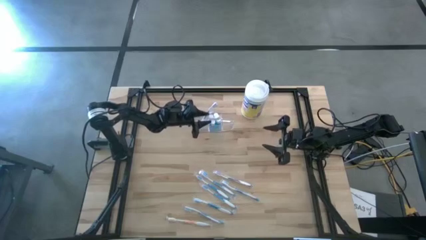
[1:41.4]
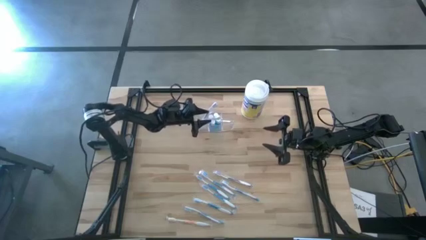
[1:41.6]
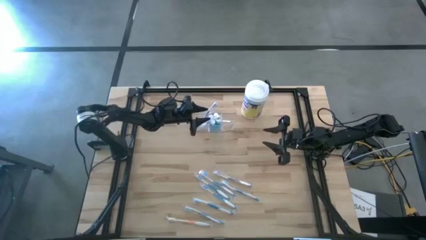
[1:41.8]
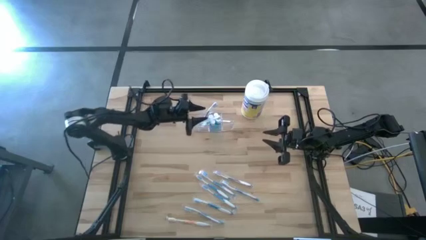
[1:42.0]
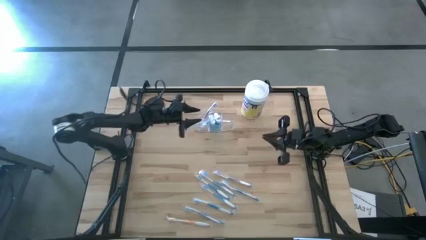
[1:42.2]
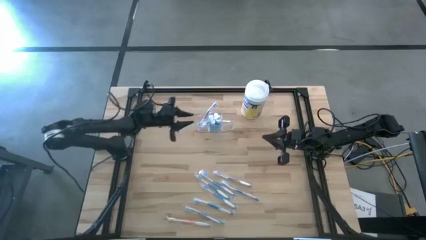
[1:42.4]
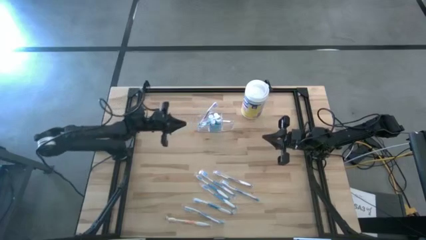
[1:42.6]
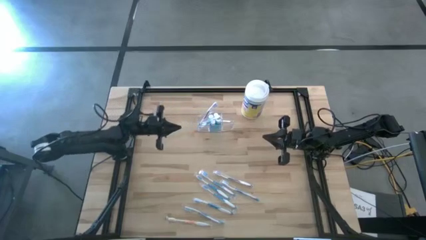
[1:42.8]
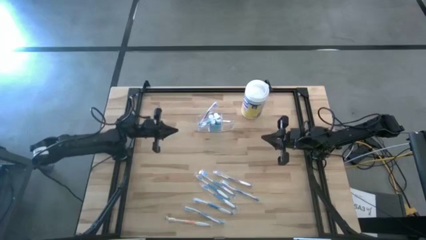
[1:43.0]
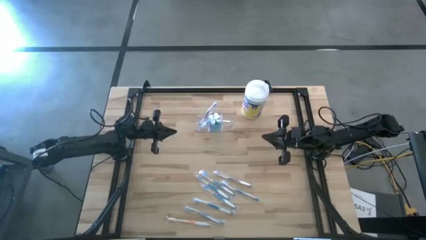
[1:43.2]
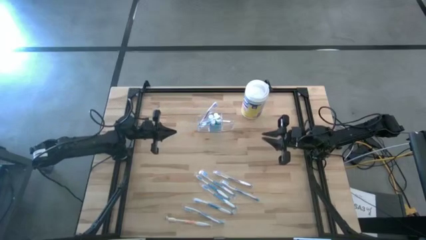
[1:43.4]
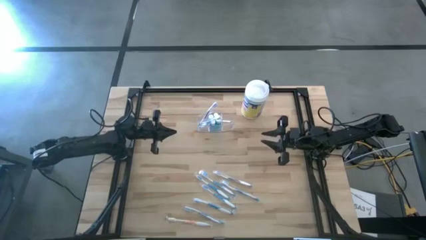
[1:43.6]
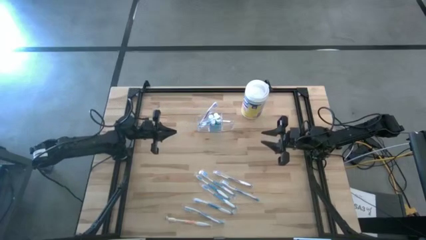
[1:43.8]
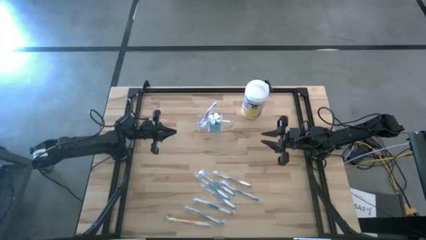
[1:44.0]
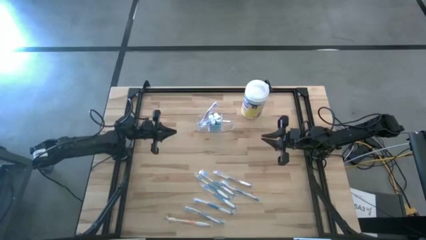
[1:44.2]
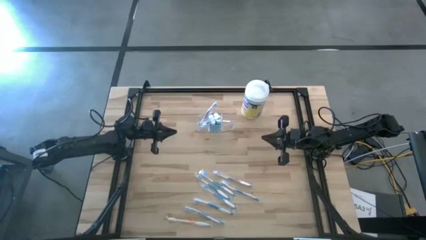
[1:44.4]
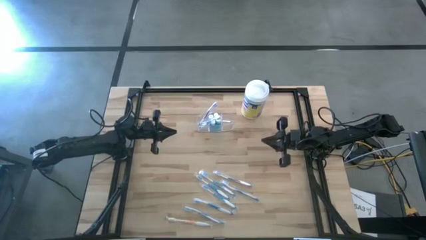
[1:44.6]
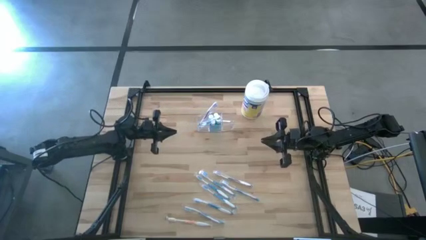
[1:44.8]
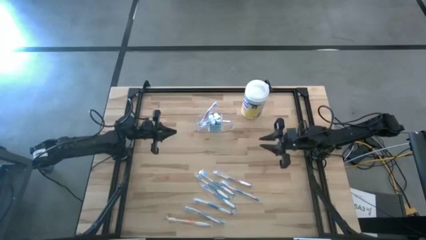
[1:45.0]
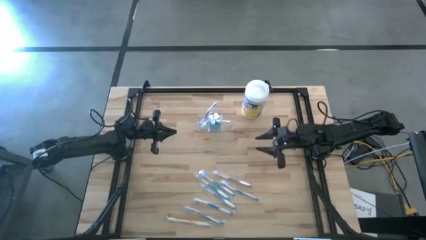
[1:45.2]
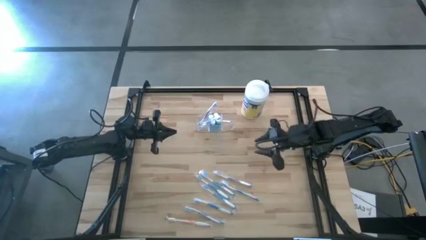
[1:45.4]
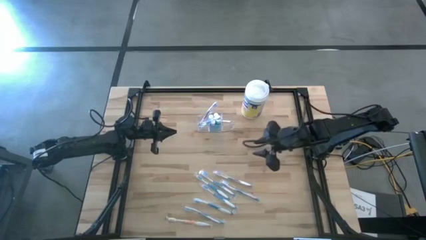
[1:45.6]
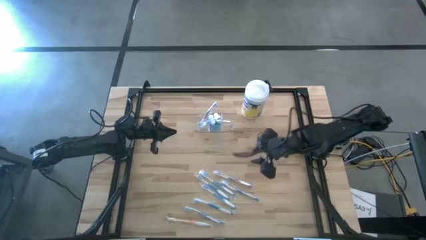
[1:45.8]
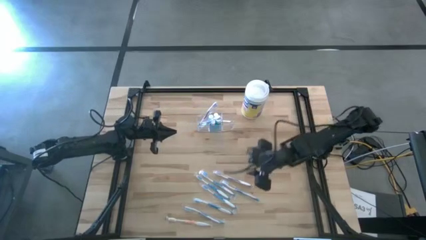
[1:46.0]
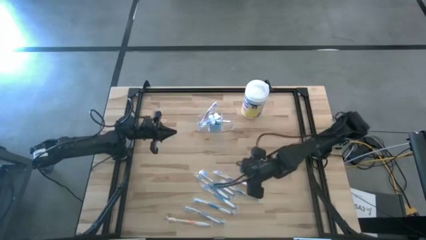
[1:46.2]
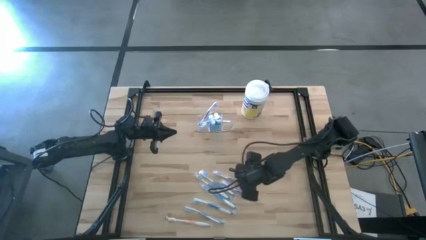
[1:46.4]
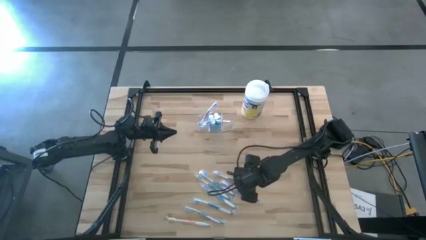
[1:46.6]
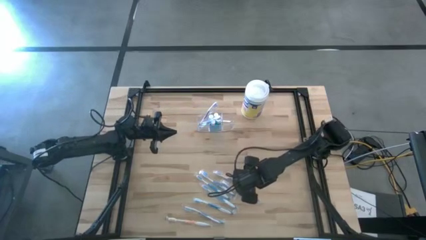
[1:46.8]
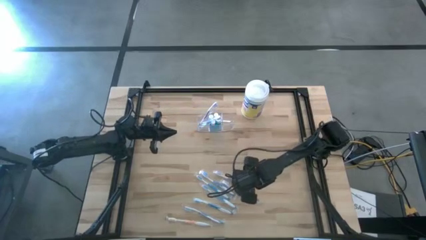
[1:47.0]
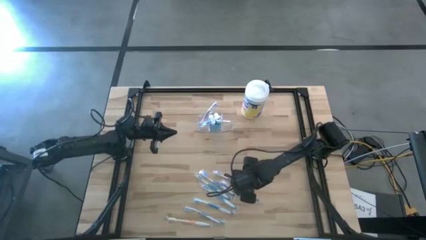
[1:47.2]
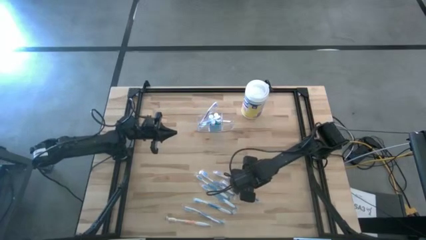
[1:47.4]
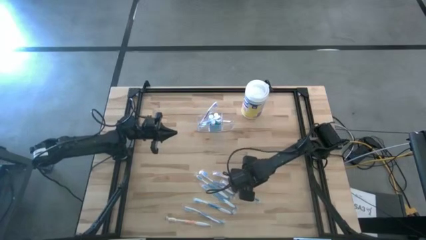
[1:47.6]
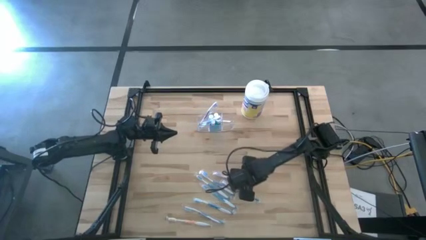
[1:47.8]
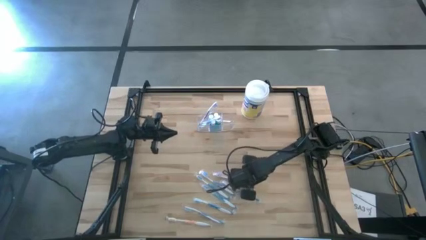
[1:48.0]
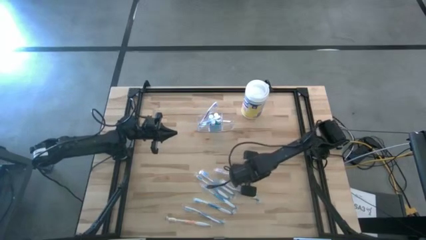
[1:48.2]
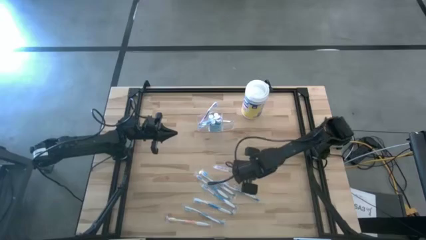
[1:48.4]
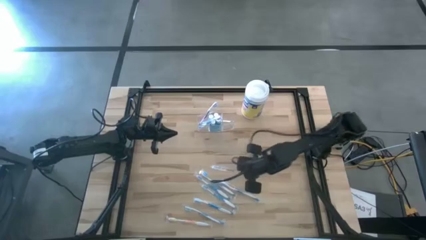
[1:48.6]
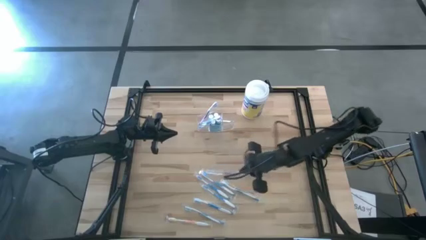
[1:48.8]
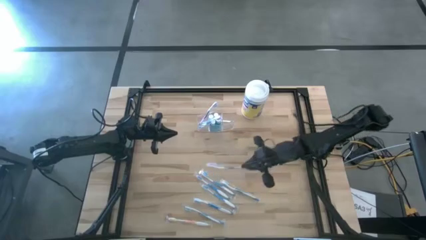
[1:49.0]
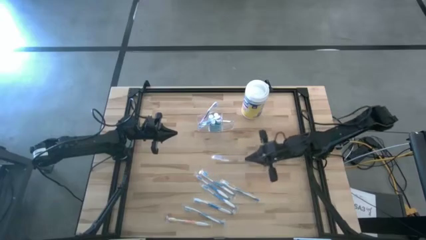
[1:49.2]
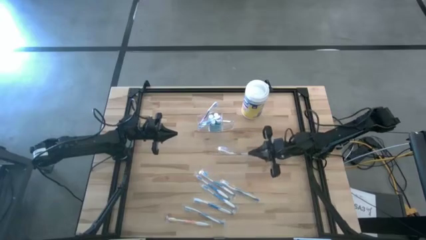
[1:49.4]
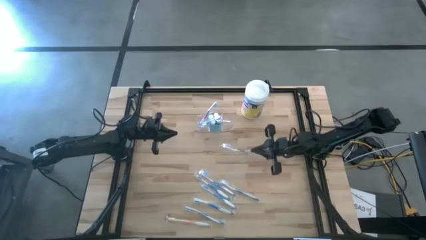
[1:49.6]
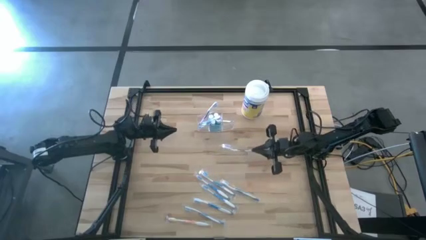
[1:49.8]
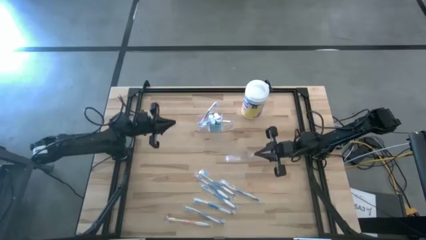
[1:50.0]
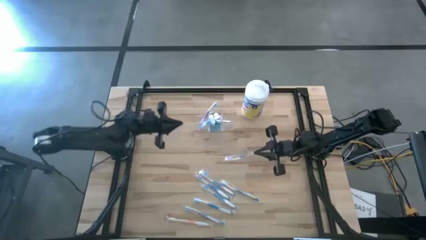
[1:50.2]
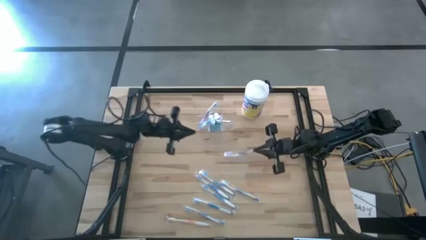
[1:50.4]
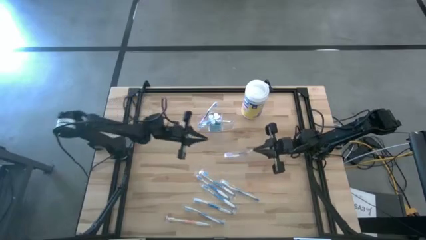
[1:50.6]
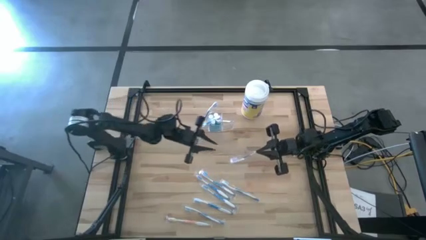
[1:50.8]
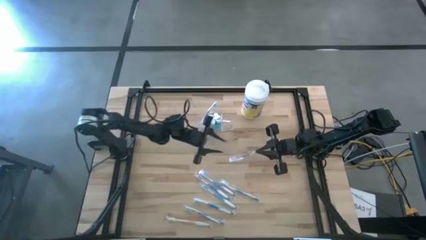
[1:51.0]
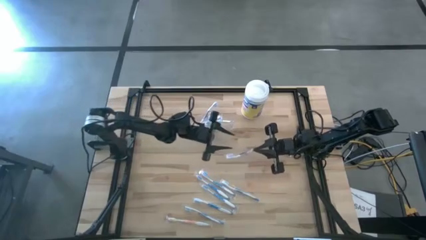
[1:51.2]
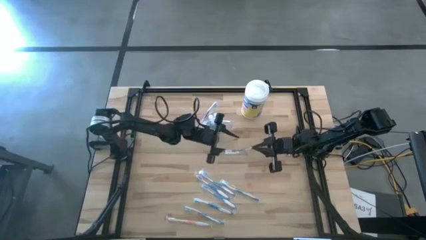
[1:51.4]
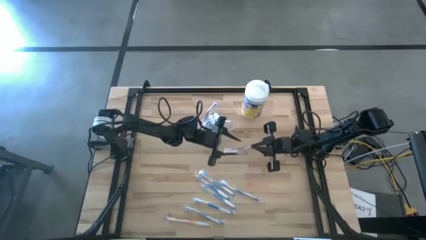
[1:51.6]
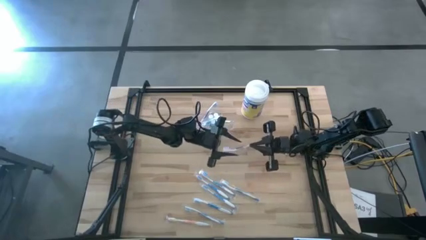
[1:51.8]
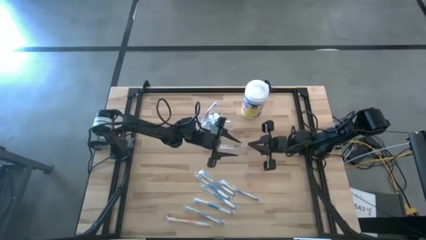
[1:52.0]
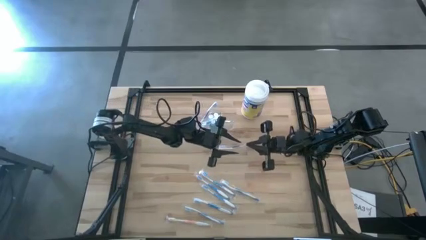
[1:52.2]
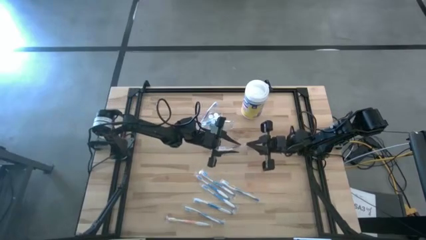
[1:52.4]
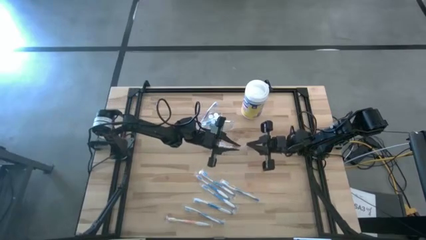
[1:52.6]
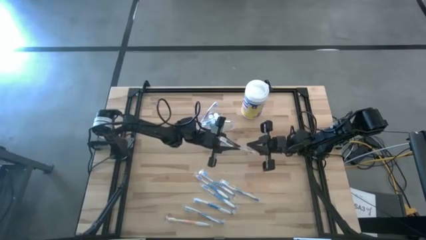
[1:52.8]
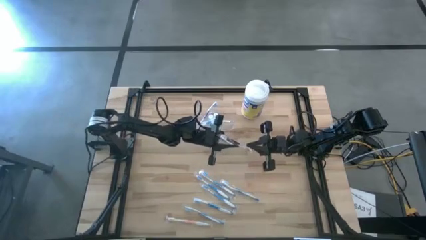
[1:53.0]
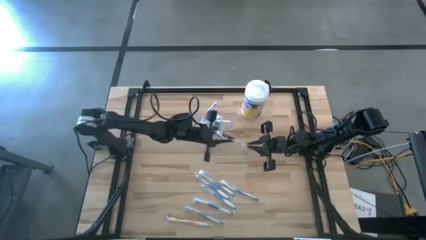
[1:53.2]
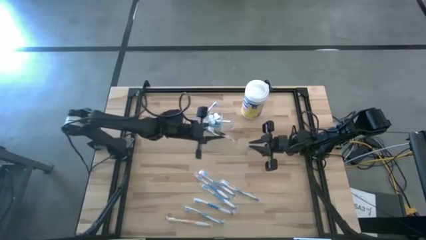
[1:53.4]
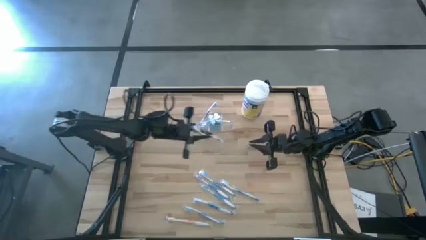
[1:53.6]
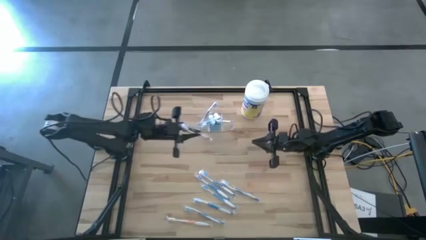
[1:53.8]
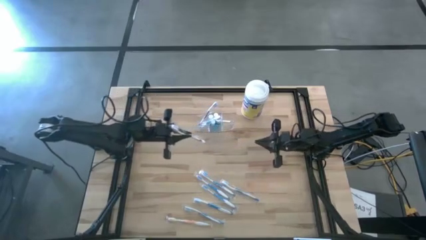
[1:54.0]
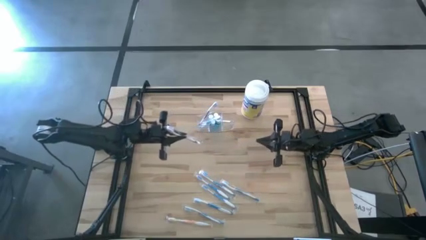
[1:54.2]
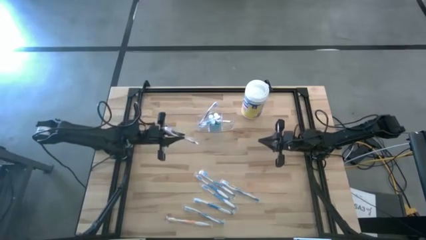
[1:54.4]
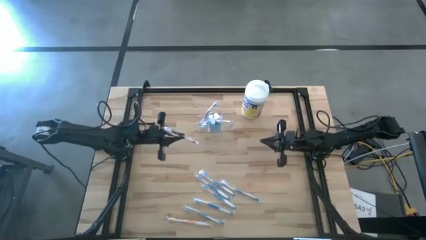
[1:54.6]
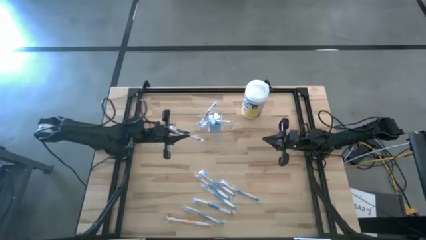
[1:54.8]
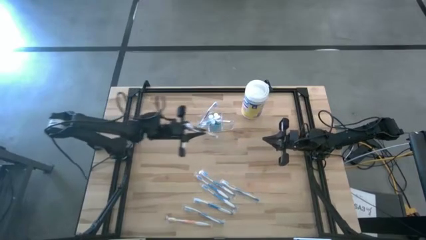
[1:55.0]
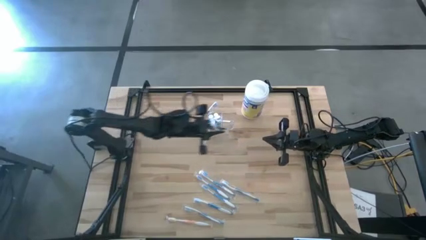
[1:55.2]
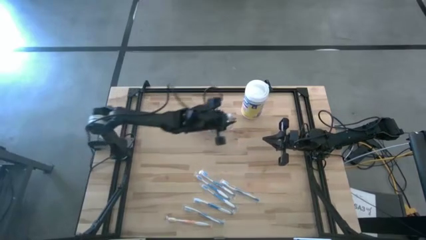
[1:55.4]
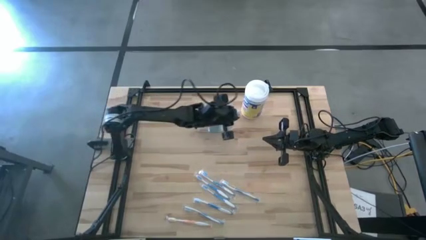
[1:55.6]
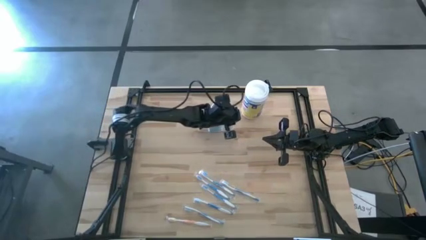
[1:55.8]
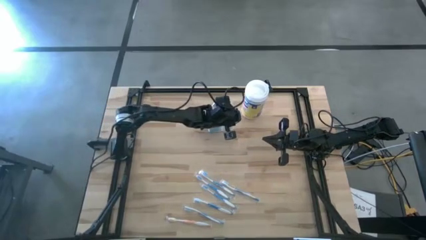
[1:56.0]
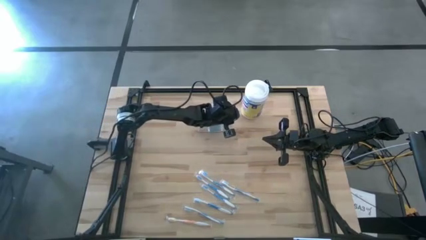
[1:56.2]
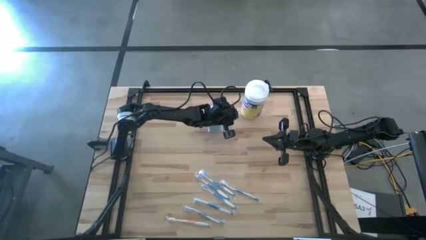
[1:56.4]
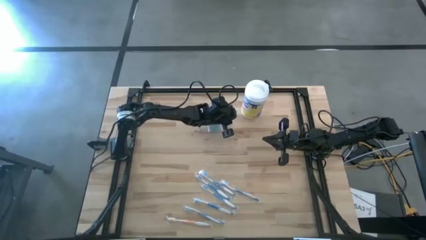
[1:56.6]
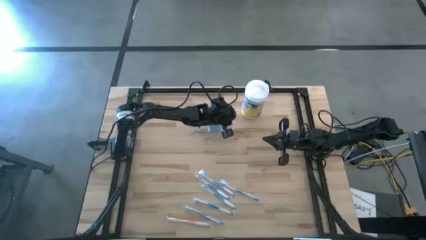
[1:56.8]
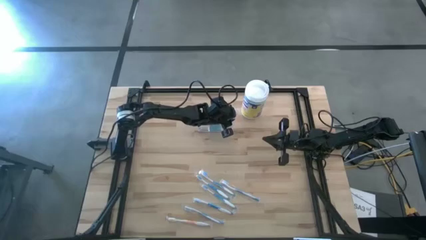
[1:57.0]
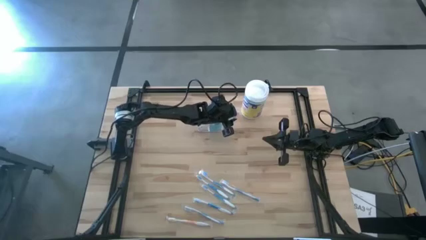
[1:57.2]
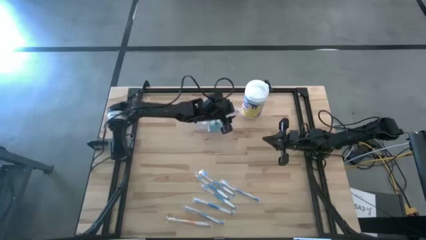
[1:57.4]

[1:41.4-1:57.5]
Task: Pick & Place toothbrushing station
Put the purple toothbrush into the right section of the transparent organizer

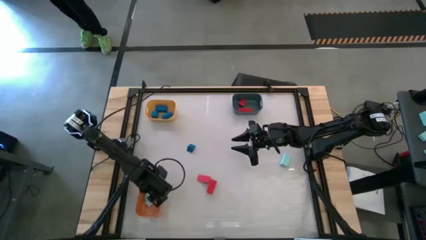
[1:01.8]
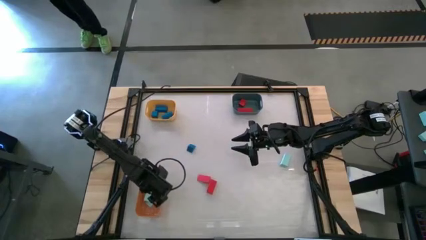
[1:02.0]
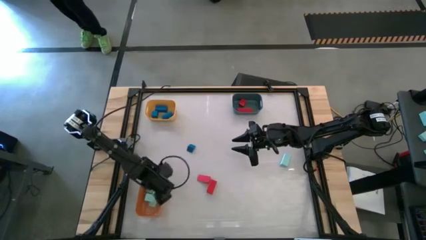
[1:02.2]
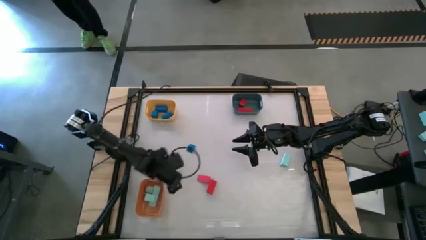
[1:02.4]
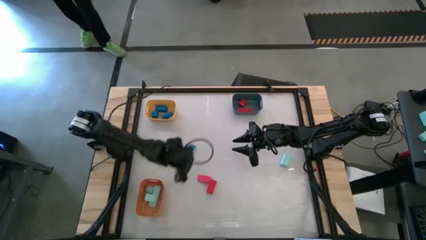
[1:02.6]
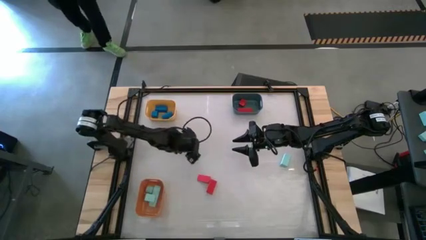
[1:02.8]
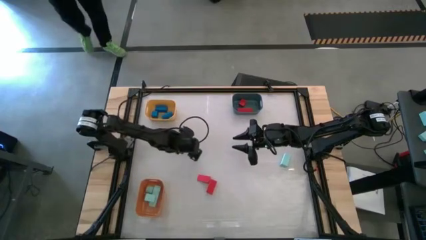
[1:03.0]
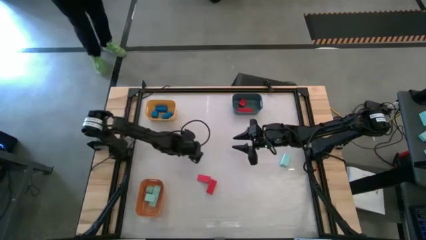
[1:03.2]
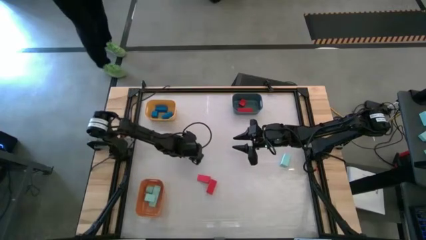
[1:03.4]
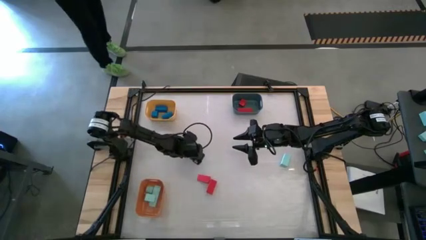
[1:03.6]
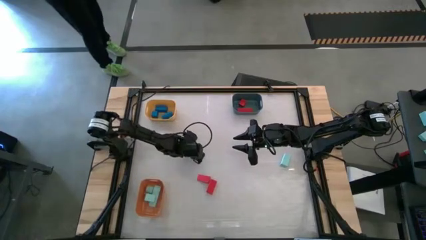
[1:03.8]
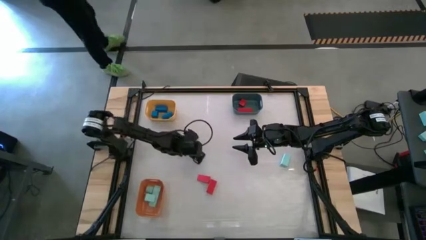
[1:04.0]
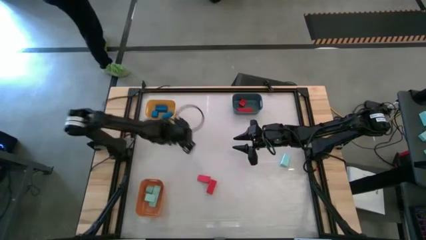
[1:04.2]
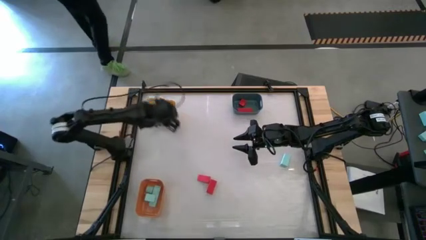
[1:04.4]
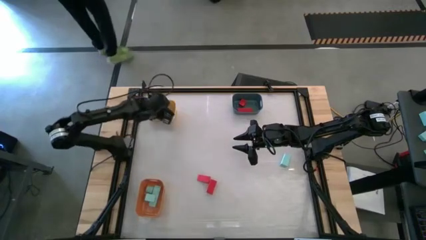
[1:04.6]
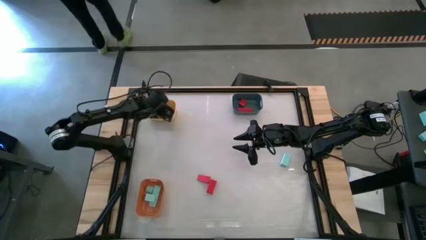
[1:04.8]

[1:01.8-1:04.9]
Task: Sort & place blocks by color
Put the blue block into the yellow bin
